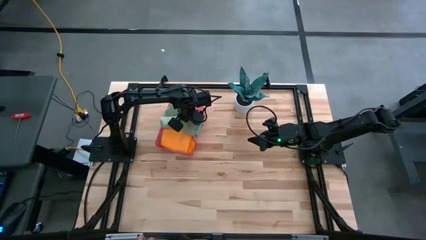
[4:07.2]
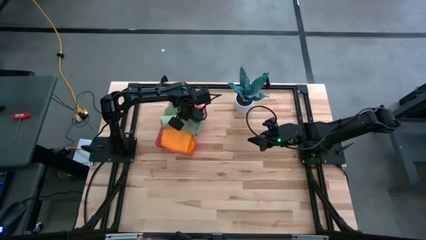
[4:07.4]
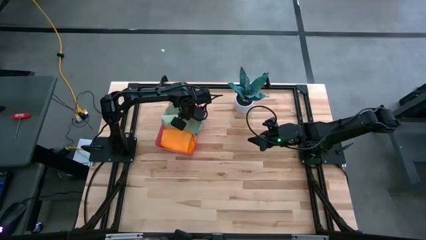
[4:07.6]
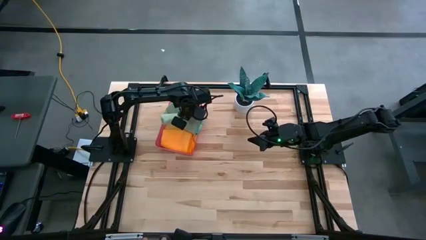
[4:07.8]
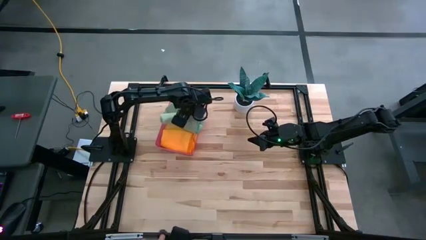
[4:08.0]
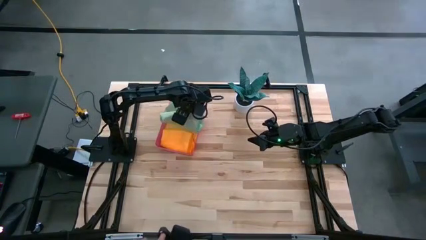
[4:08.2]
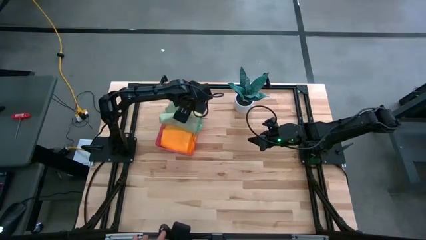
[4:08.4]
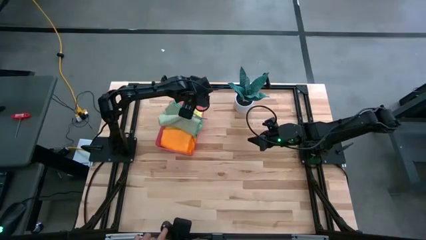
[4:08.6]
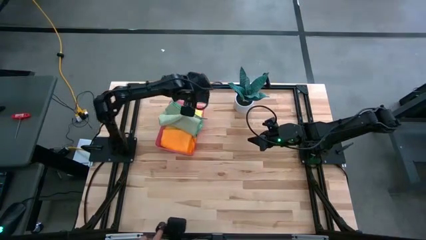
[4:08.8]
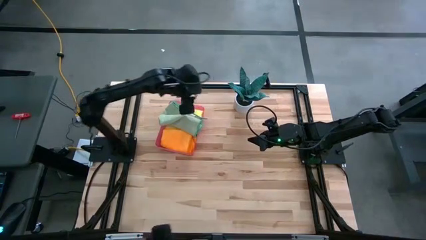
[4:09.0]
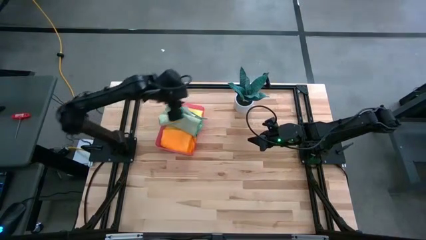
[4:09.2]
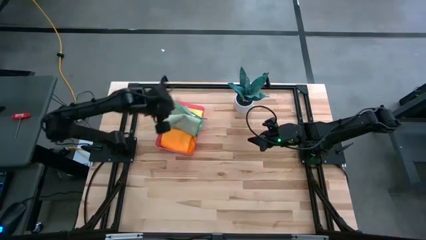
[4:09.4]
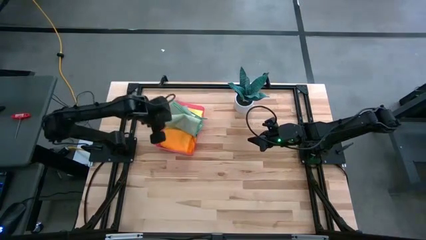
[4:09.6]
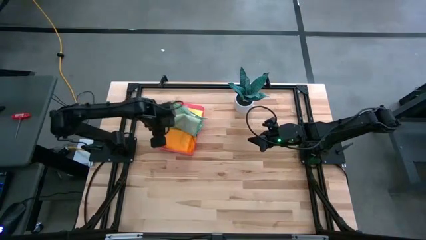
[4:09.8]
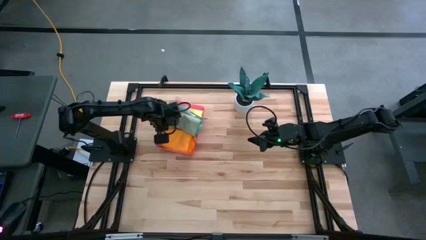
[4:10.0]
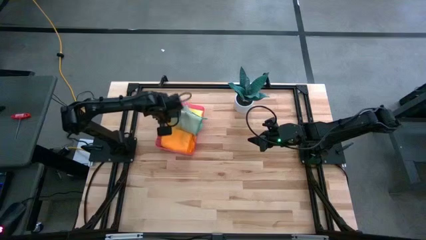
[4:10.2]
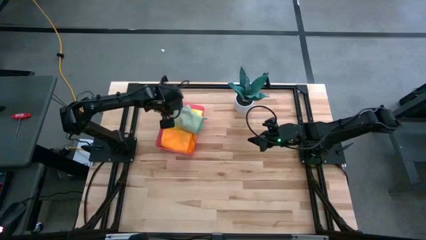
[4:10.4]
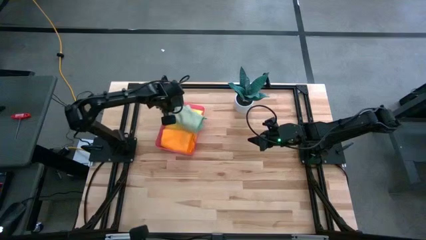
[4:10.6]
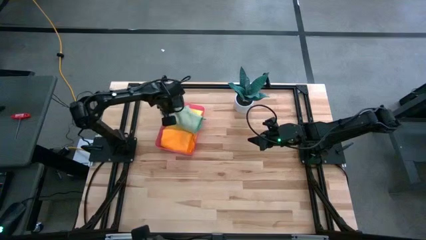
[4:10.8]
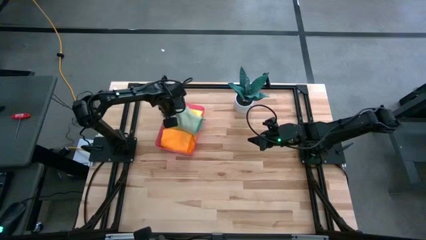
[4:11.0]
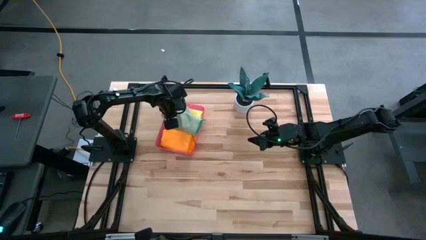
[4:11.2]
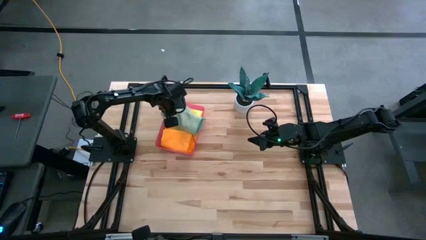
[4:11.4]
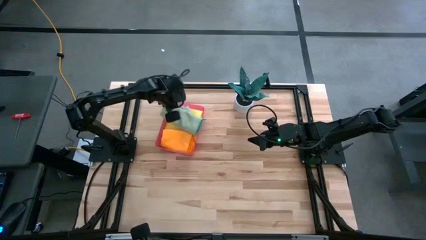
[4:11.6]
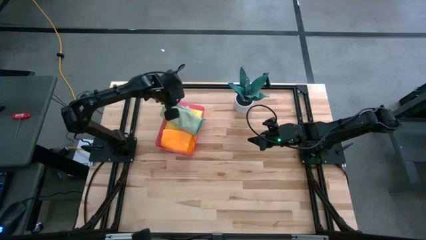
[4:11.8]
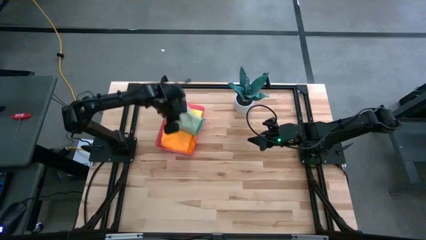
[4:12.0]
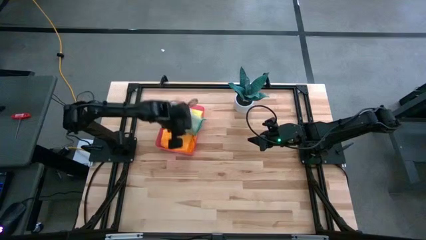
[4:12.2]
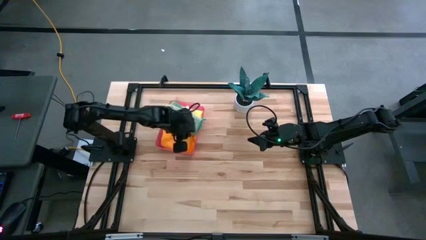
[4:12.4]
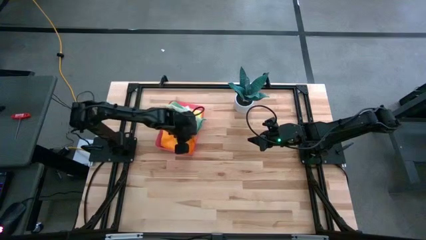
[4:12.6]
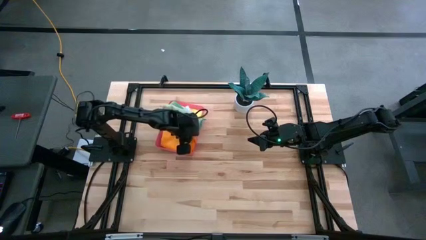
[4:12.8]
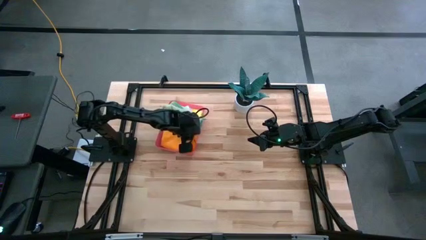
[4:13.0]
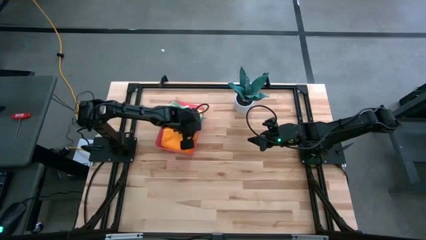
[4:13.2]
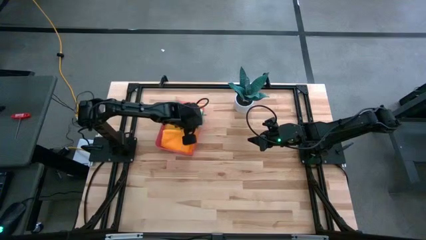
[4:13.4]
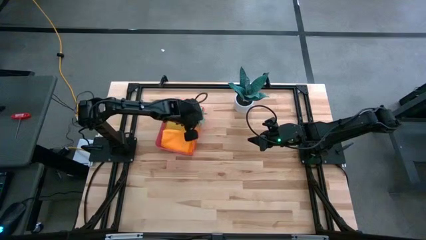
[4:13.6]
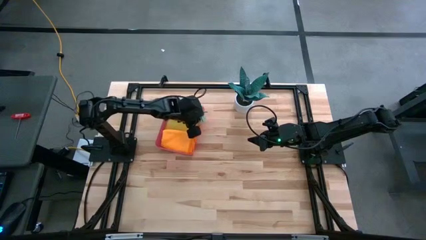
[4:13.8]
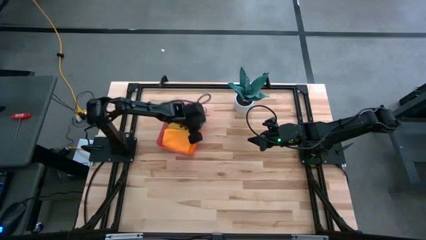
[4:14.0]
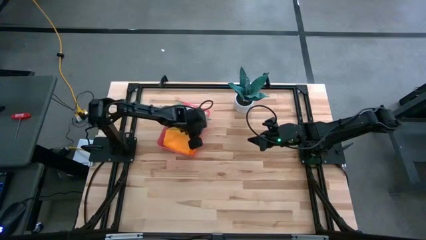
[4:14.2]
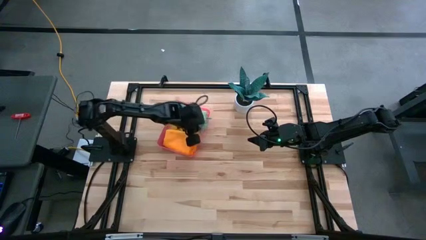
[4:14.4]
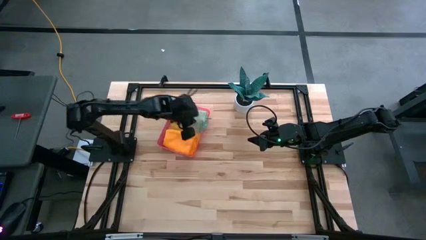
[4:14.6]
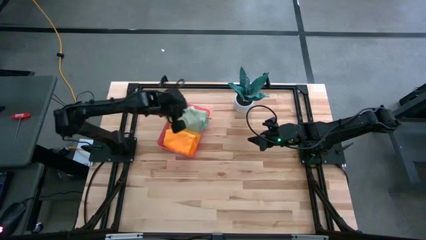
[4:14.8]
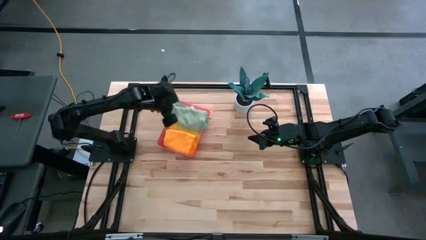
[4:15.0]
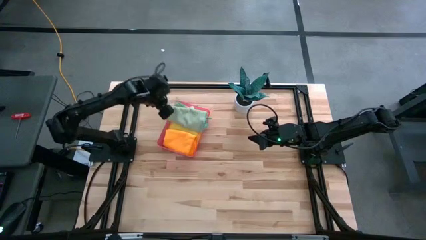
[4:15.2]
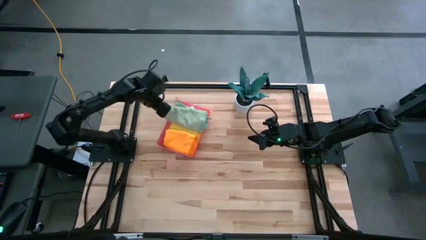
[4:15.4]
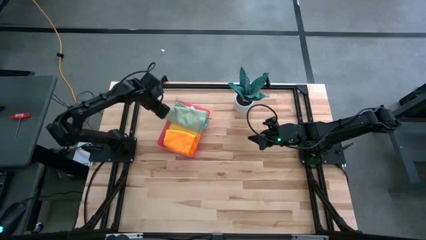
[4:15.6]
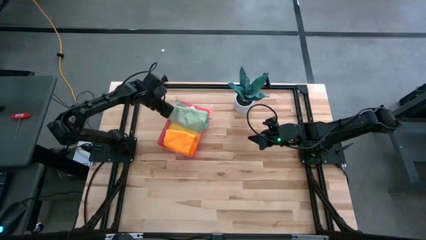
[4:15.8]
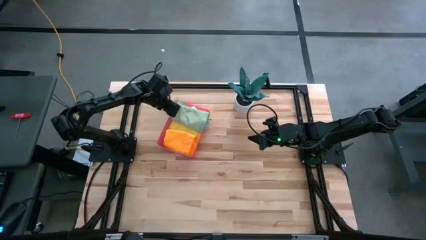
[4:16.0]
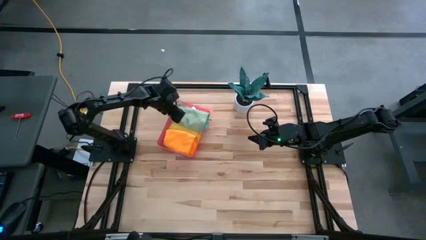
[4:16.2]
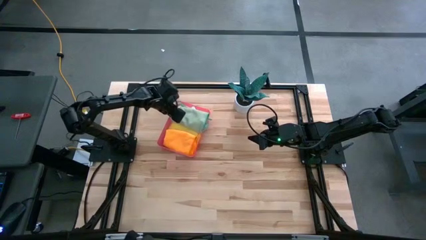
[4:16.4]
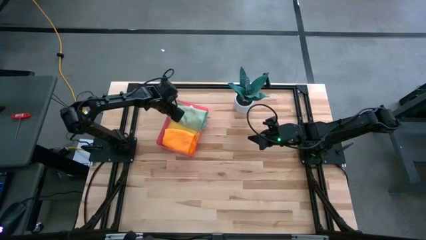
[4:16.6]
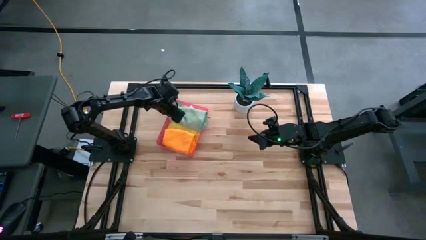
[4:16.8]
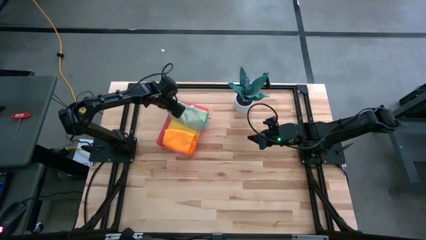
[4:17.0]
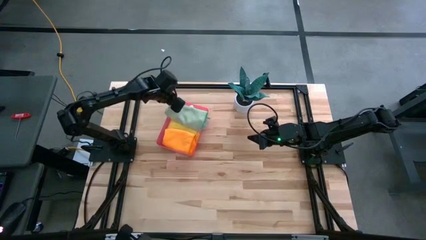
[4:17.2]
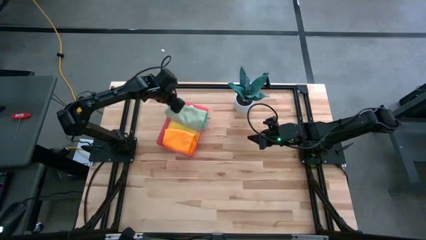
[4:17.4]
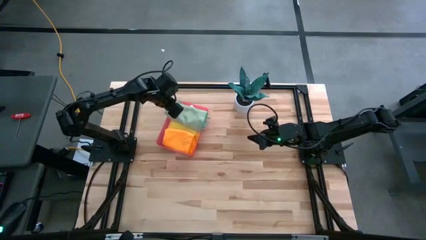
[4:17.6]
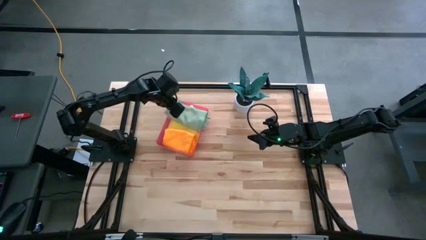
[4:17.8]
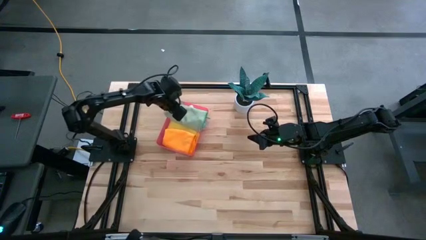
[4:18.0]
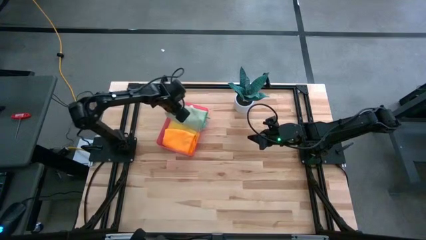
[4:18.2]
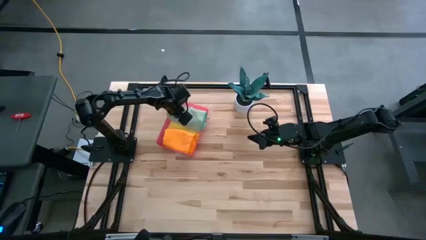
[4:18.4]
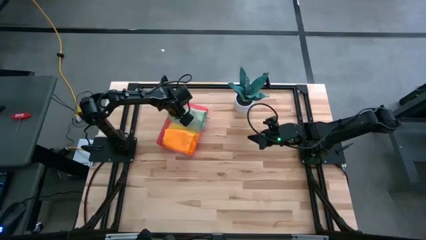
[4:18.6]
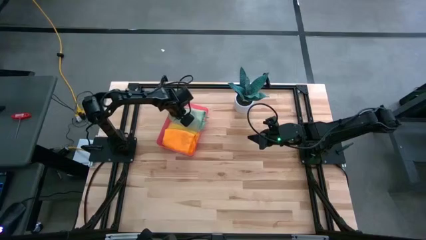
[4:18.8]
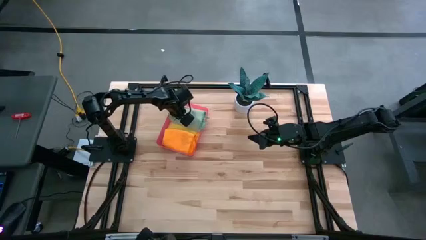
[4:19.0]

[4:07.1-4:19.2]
Task: Fold microfiber towels
Put the green microfiber cloth into the pink bin

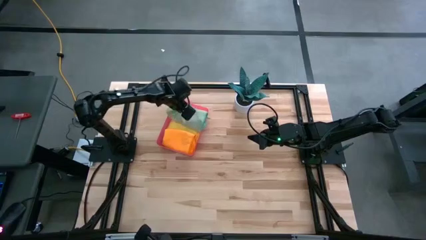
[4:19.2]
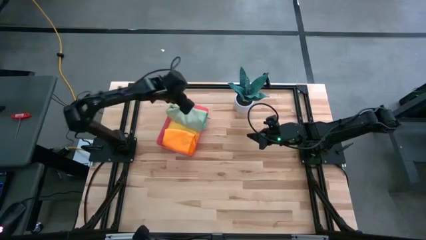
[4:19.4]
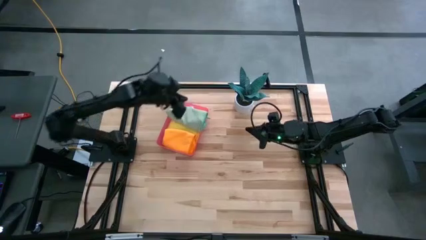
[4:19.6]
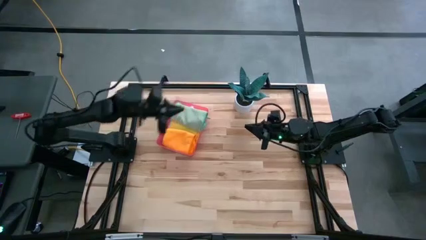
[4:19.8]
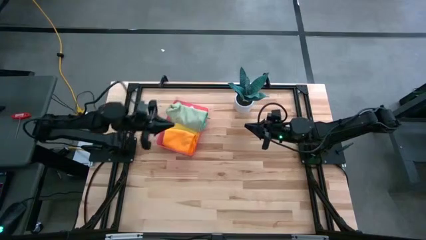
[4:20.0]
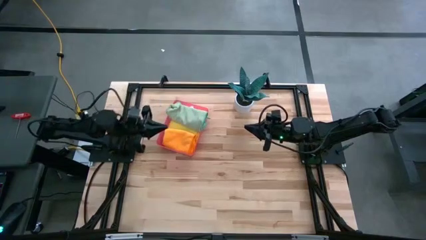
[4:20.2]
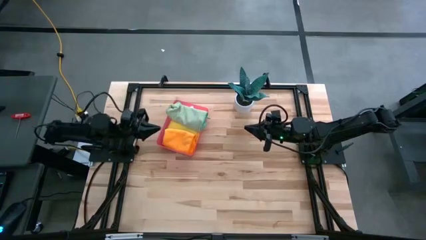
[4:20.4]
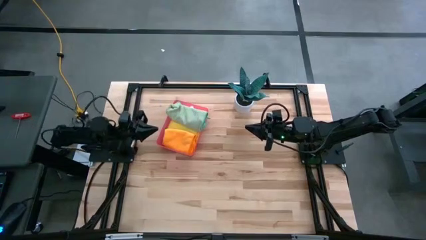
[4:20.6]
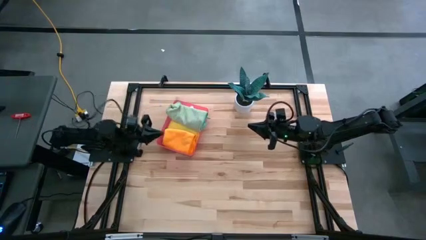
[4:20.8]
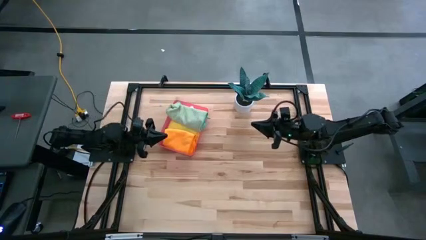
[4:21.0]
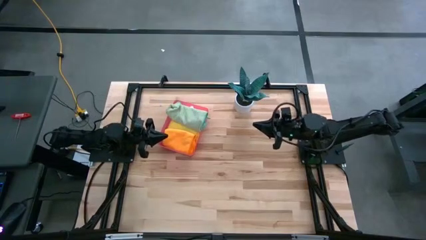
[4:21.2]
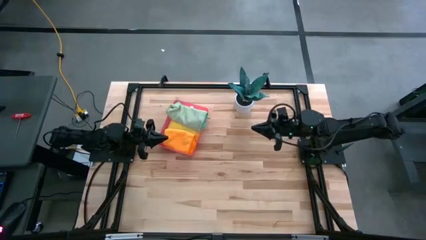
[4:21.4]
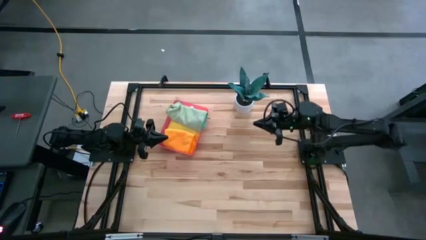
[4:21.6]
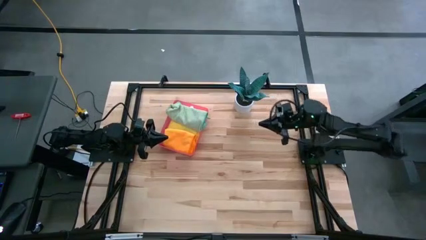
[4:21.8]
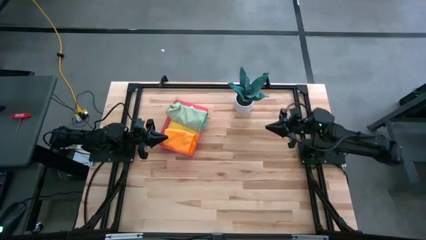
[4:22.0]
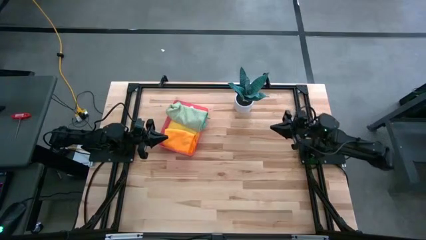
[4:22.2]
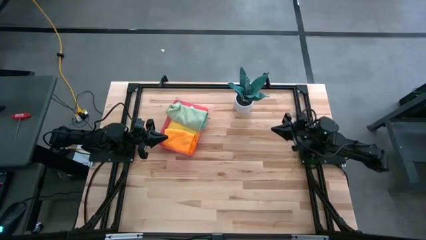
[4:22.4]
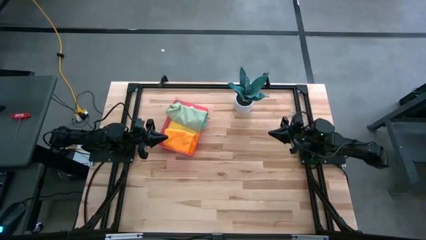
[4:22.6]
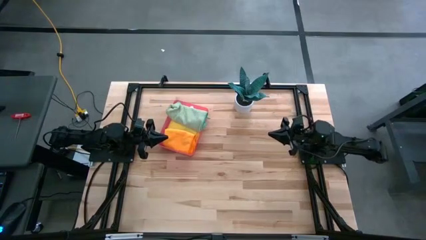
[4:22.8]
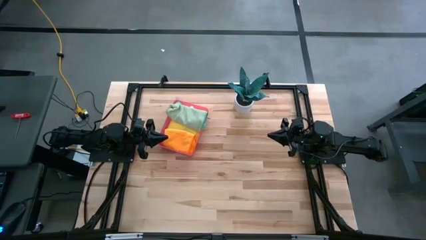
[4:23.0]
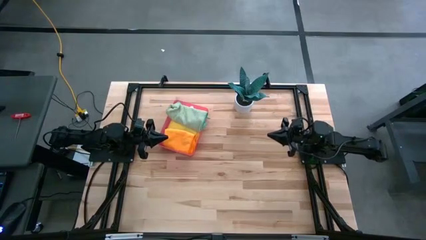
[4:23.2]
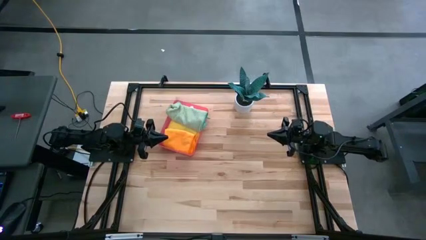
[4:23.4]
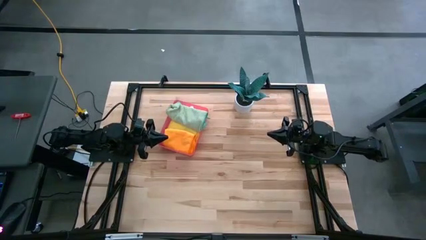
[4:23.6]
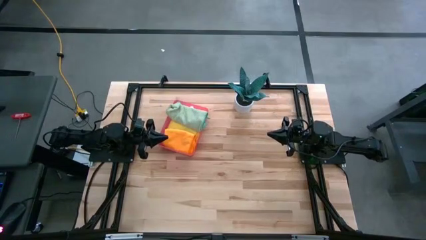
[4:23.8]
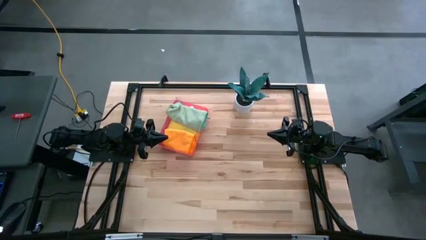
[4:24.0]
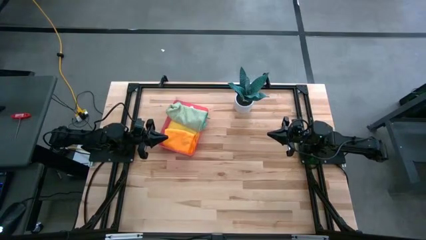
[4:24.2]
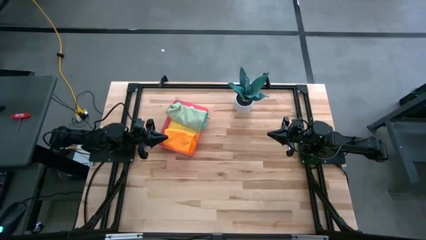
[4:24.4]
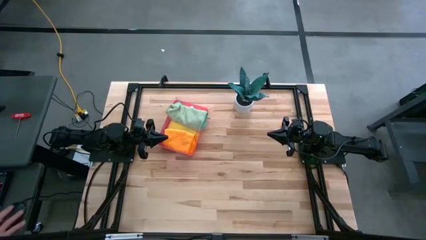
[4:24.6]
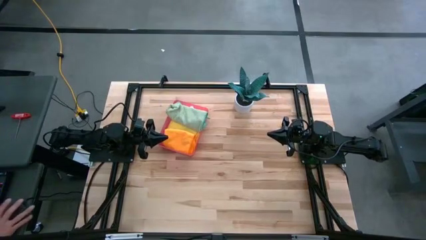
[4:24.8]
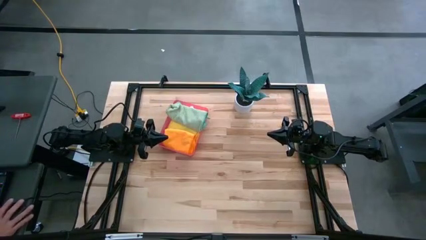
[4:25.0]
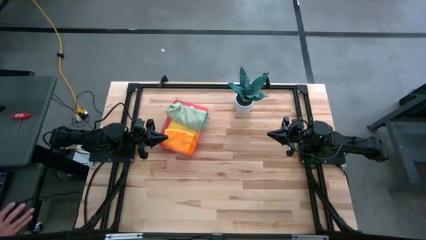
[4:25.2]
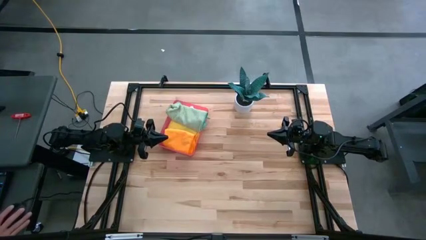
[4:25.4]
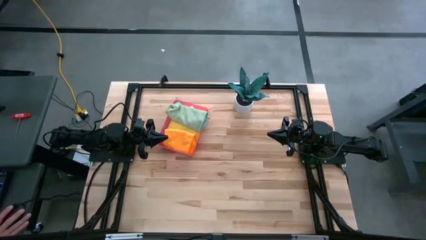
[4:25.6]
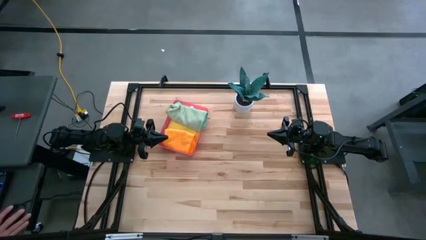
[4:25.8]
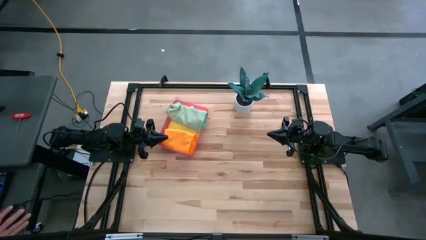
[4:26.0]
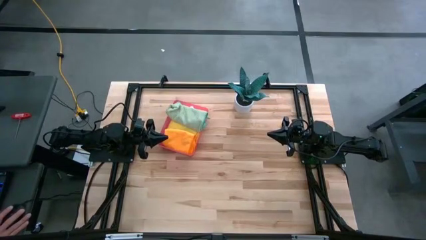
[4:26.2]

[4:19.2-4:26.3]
Return to Home Position
